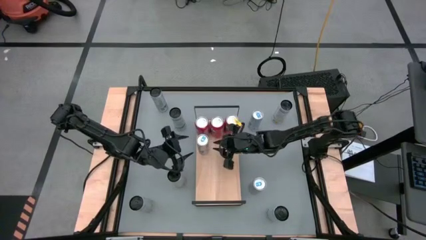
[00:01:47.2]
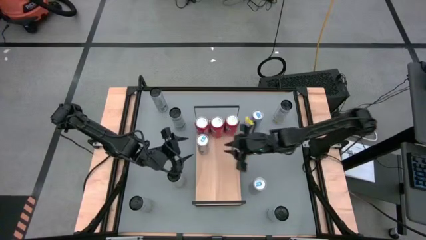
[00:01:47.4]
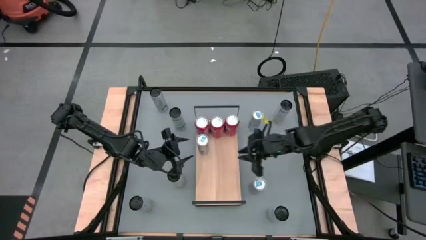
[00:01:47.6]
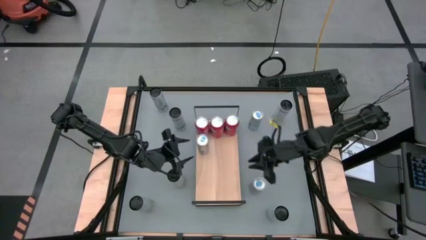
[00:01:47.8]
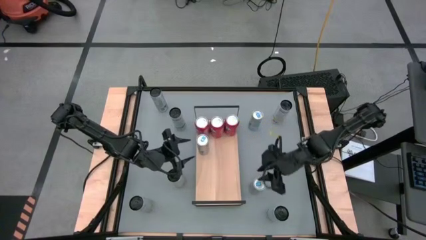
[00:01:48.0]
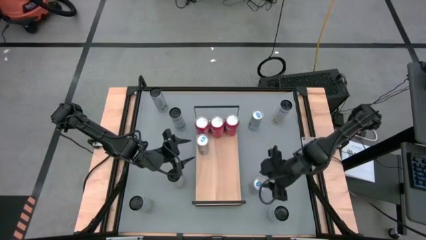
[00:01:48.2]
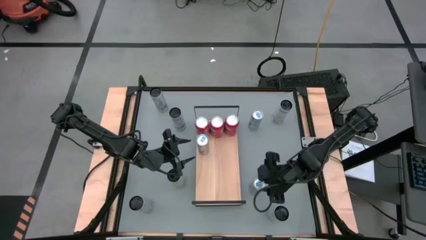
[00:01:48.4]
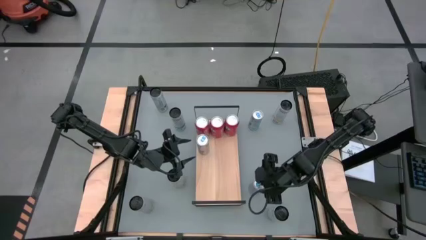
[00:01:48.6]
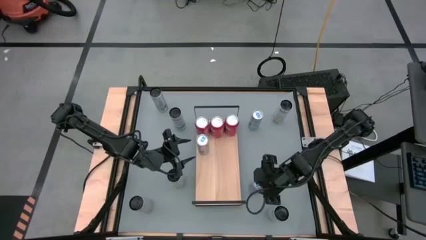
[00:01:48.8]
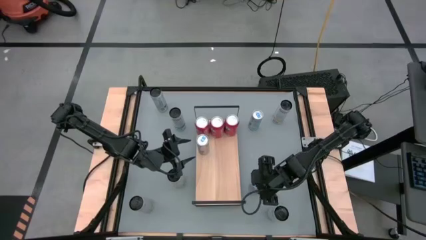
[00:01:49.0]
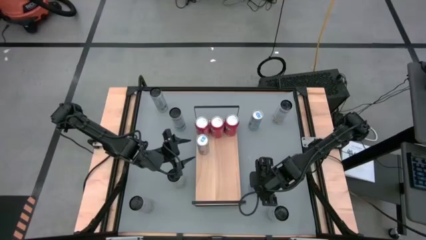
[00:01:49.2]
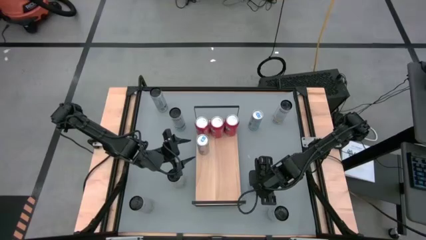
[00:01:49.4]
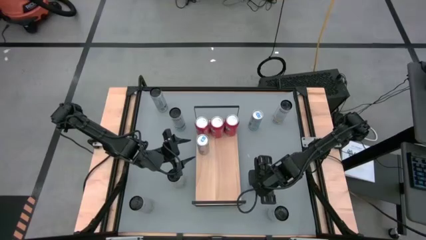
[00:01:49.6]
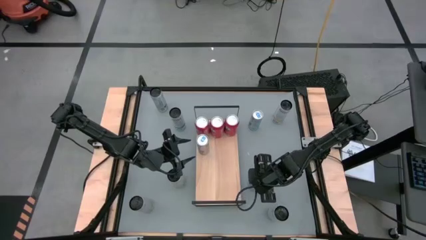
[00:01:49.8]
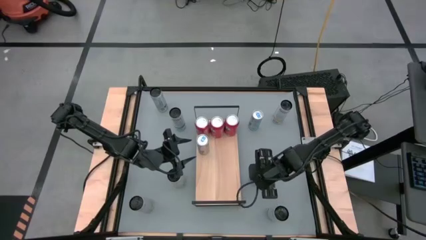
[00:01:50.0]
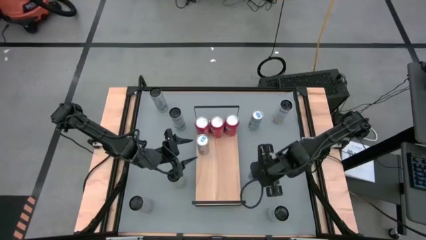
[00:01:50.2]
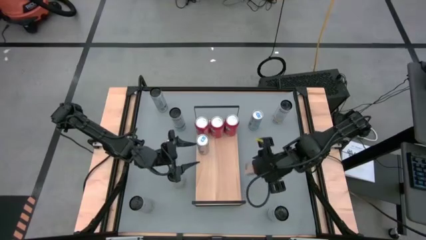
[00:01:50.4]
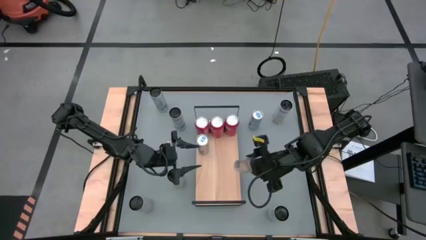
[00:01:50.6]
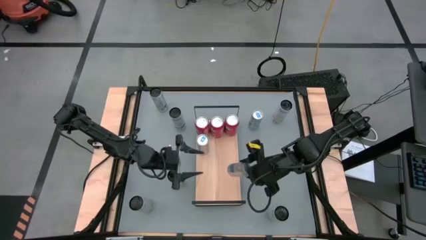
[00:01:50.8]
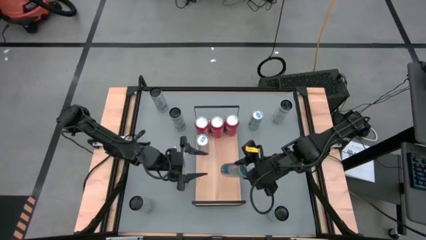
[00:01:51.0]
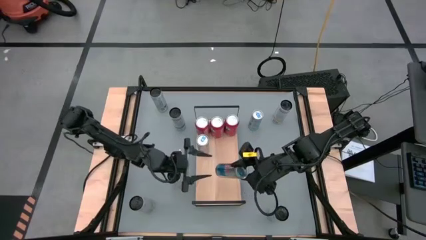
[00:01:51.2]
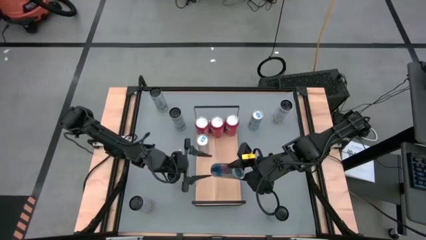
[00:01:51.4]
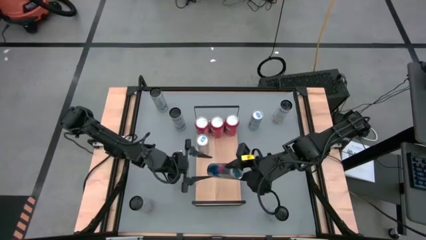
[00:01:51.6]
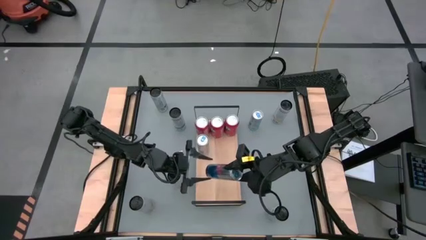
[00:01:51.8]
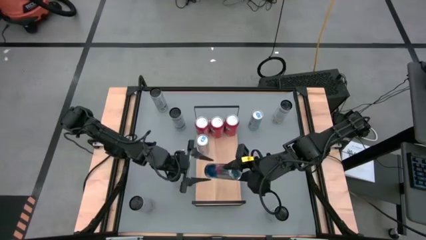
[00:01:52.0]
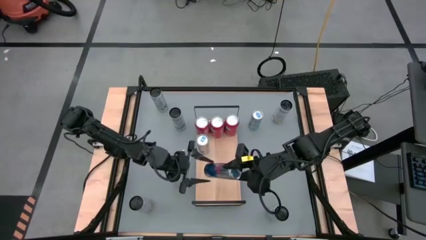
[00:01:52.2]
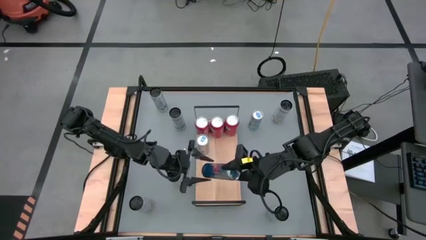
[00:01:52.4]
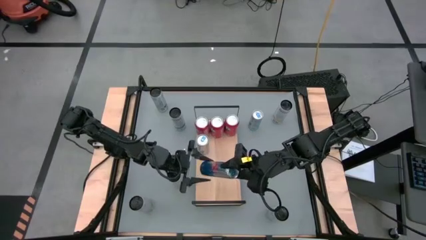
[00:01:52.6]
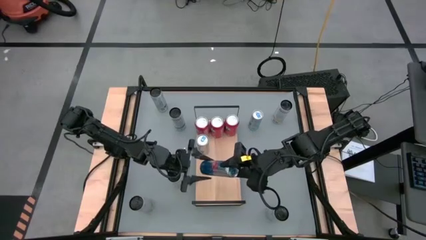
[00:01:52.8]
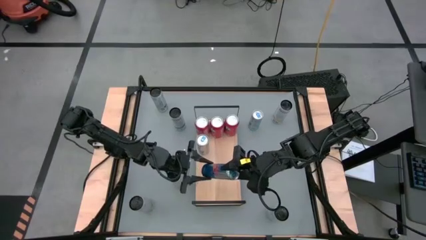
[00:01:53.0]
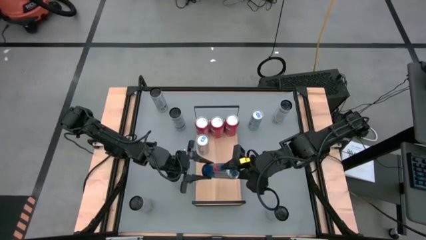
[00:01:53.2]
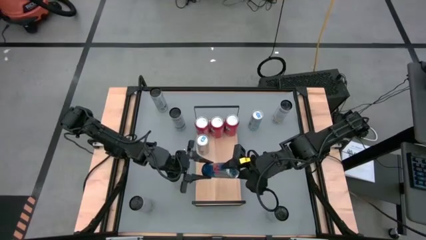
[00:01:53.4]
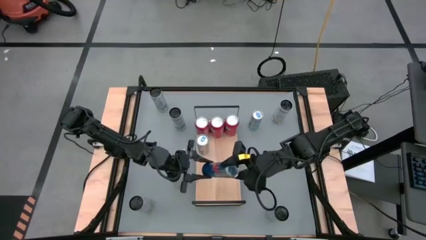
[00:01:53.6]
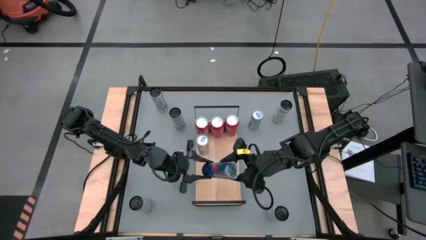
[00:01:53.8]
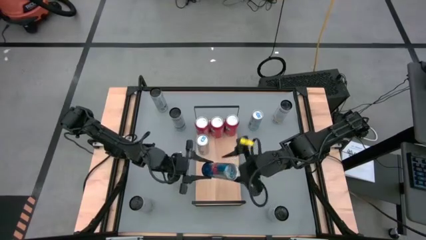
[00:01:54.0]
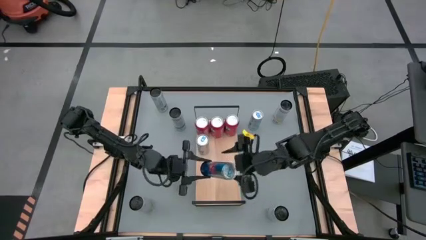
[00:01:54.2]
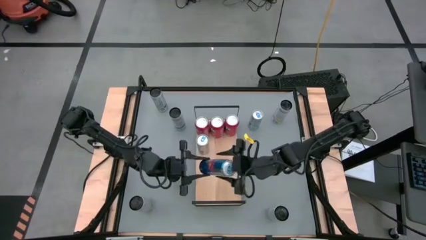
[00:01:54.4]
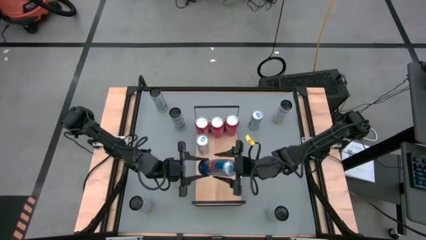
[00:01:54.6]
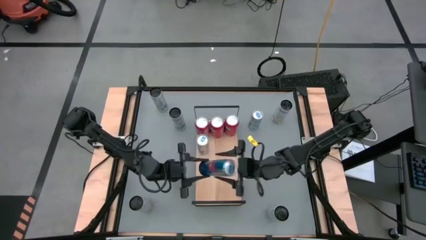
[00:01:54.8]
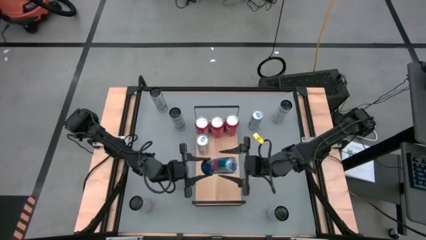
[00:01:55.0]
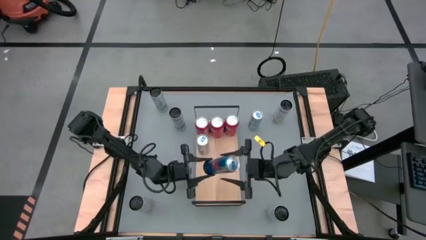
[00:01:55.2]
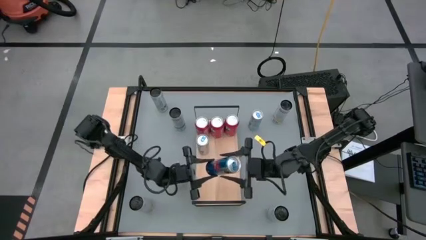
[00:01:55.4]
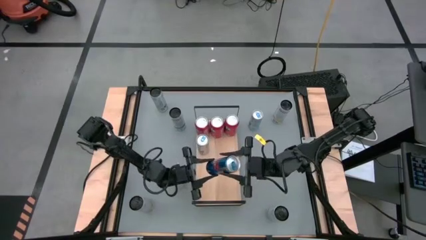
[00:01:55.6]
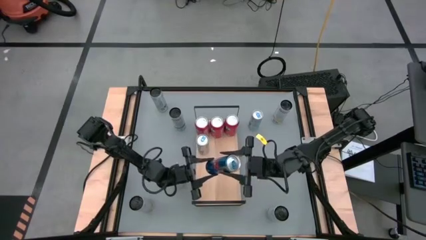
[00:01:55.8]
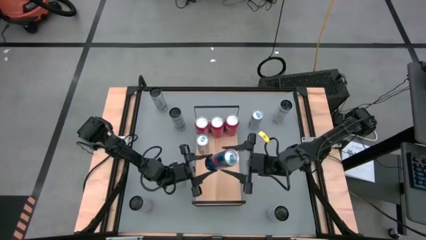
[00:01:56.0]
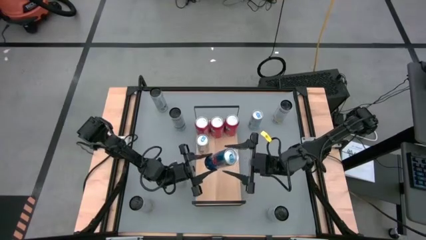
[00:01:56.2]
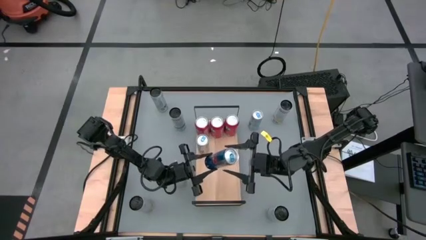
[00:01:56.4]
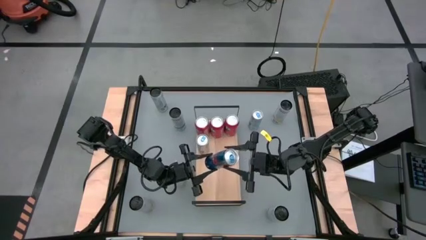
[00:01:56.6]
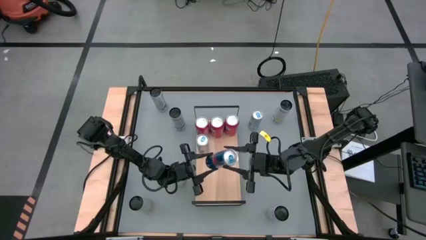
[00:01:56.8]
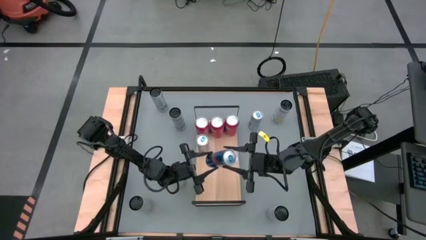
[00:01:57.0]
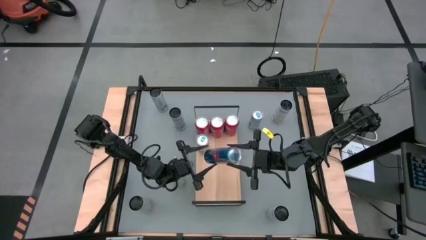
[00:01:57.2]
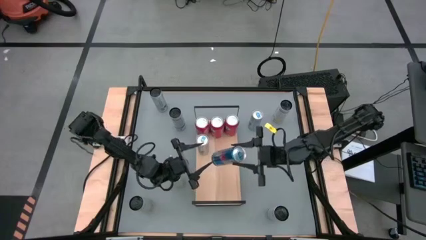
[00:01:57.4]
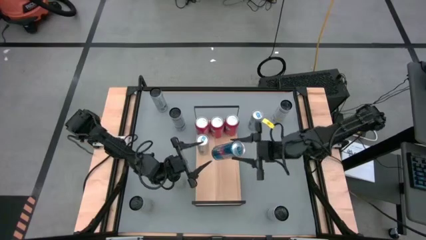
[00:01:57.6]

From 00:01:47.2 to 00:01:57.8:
Task: Place canned beverage on shelf
Put the bottom blue soda can aligned with the other blue soda can on the shelf
